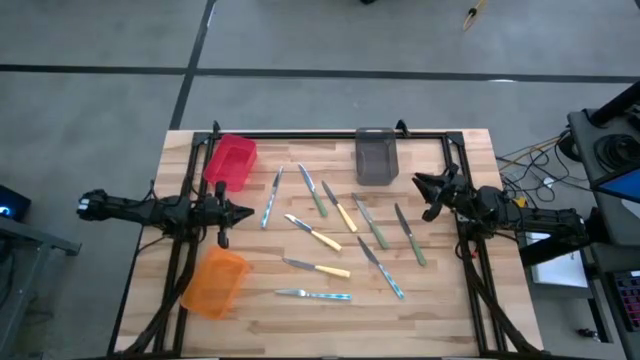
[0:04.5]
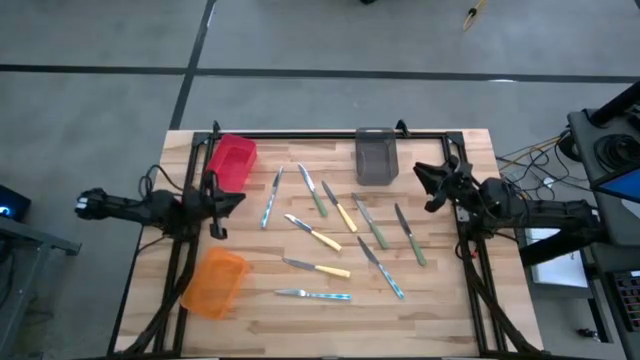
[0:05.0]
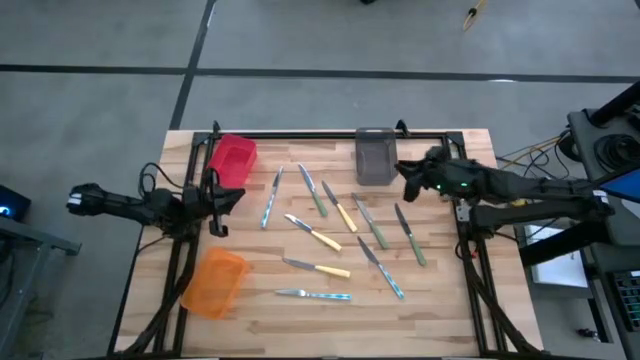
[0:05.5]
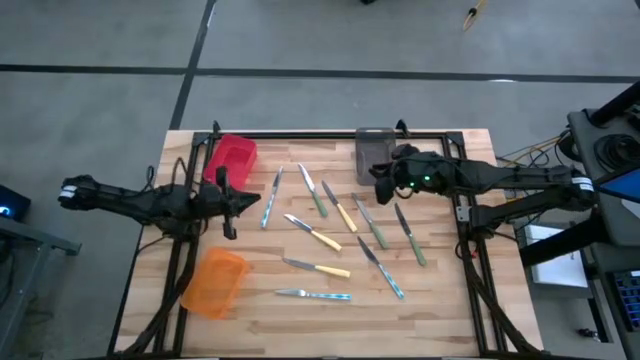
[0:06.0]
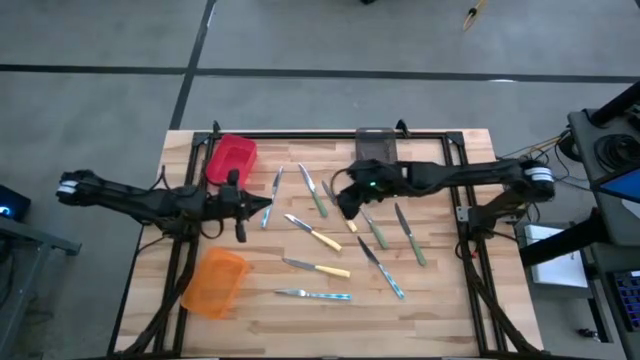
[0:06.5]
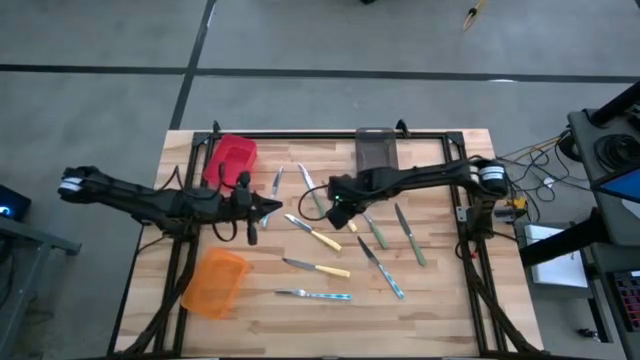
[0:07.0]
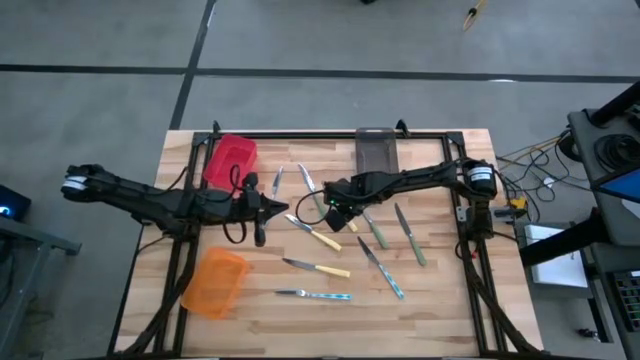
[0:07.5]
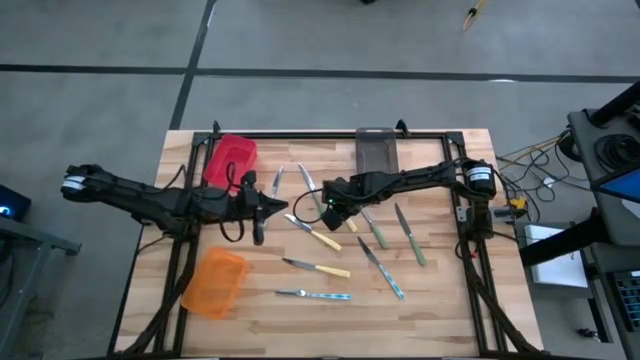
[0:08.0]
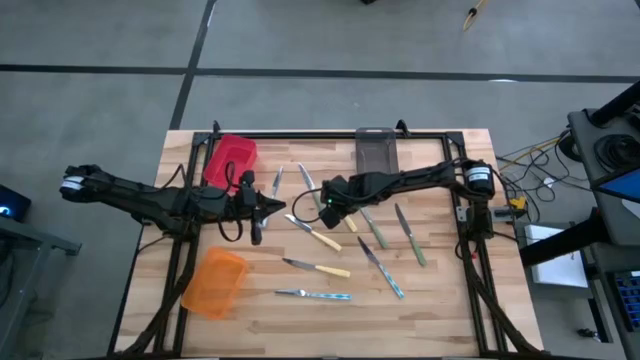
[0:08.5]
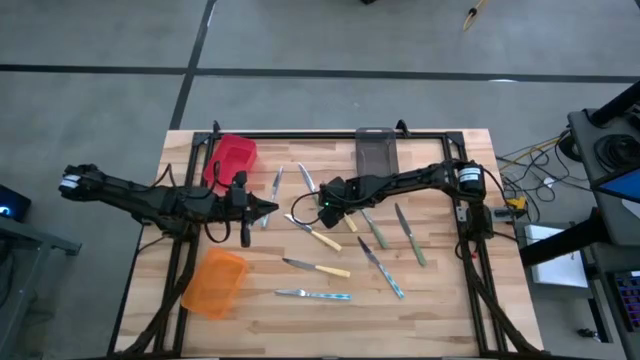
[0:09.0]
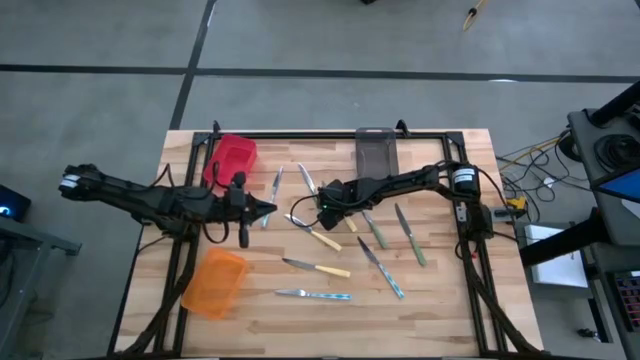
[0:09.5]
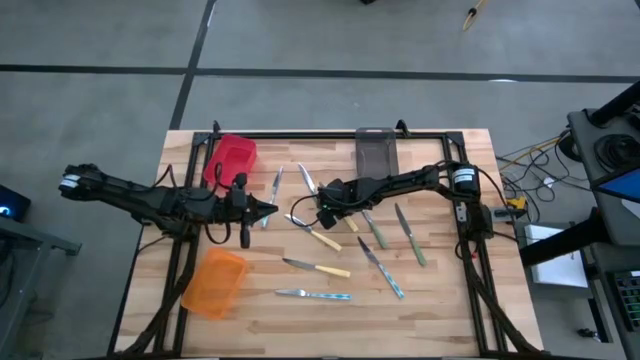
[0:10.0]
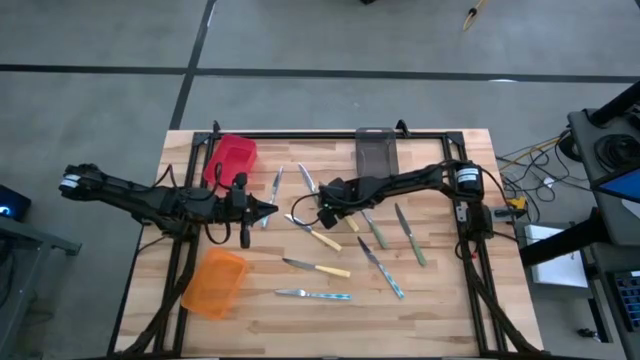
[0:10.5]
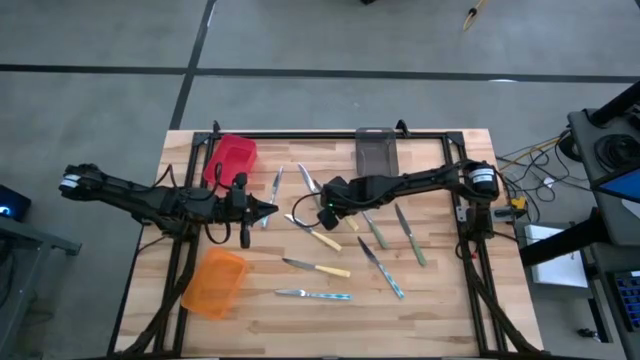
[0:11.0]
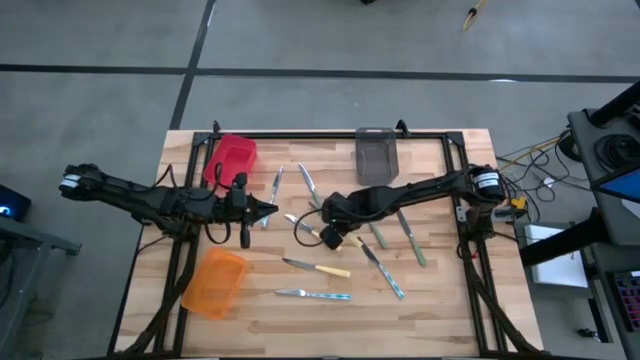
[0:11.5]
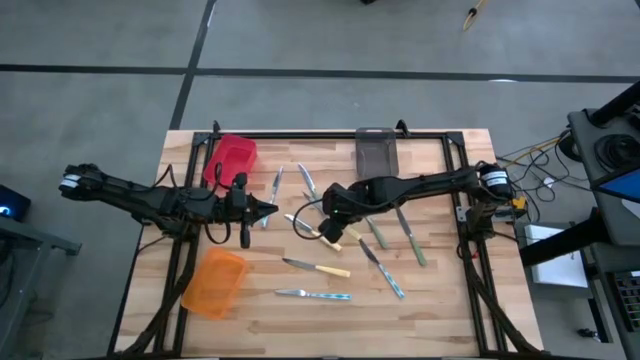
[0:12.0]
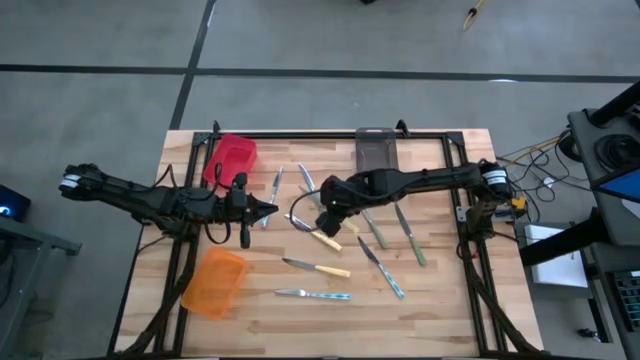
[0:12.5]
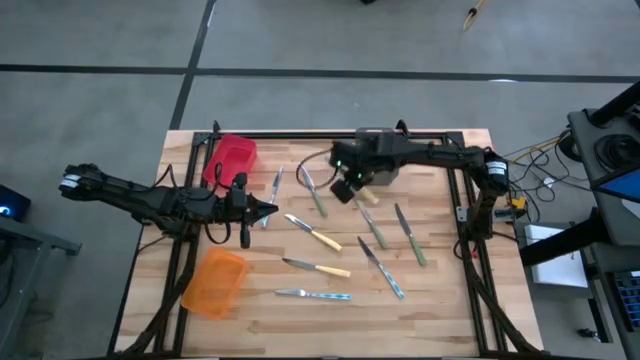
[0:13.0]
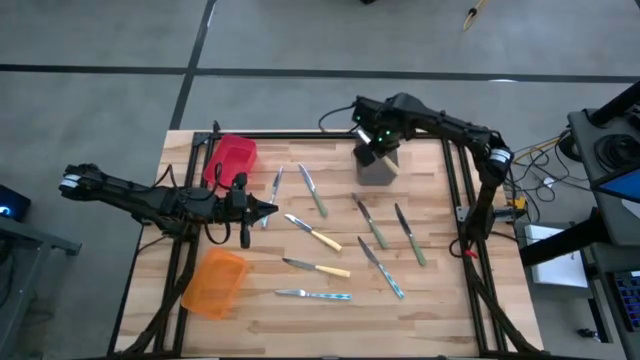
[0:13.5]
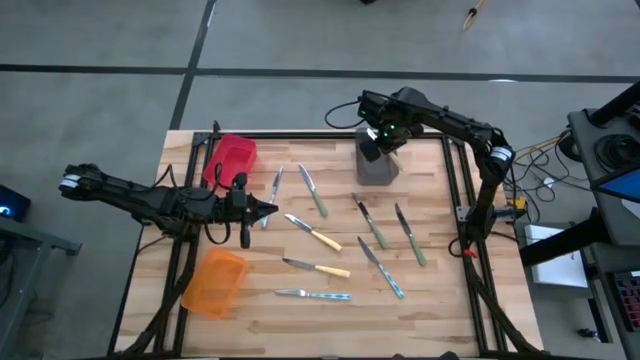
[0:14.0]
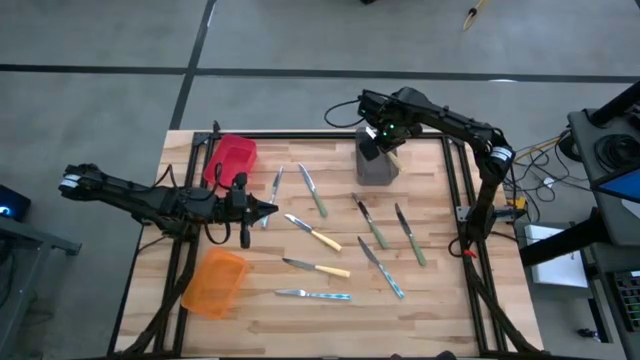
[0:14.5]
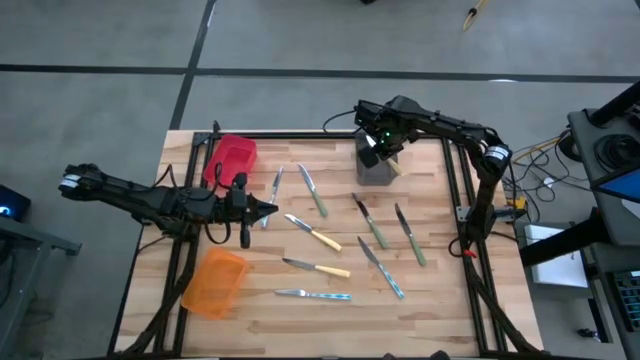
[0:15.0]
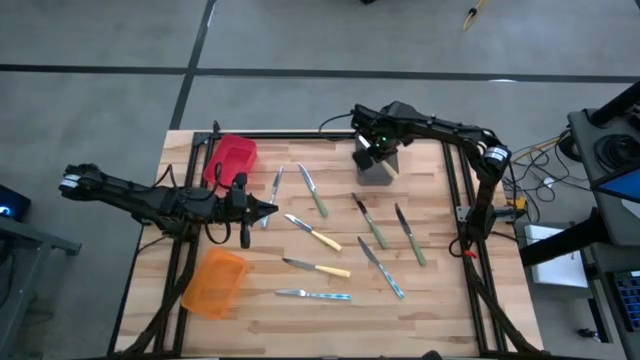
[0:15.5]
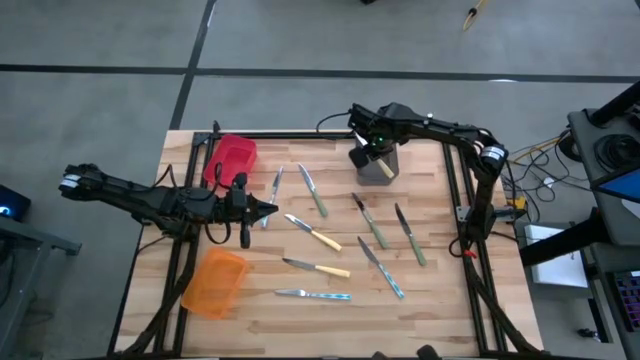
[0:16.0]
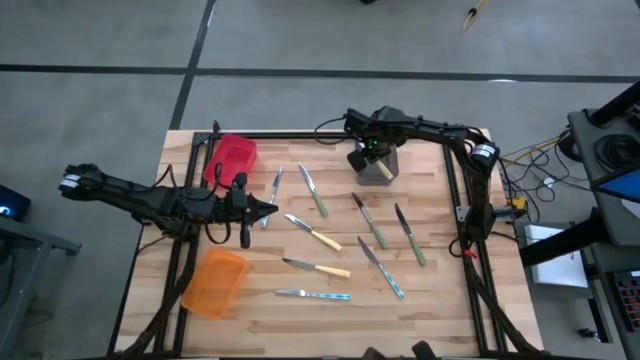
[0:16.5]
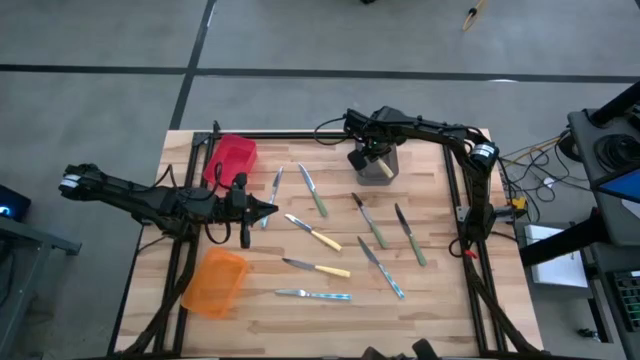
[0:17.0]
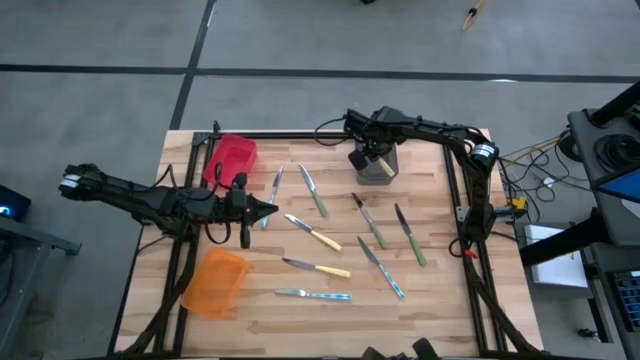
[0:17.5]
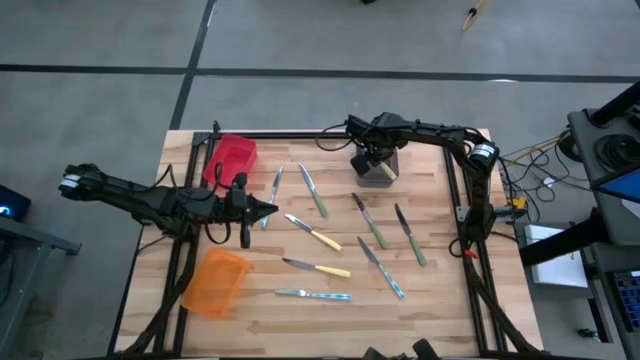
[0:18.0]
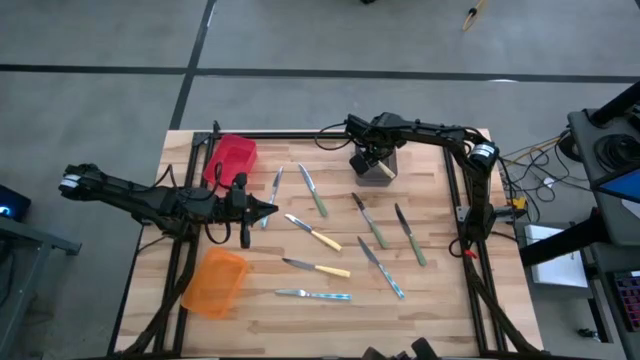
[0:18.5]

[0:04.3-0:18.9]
Task: Sort silverware by color (type)
Put the top yellow knife into the black bin
